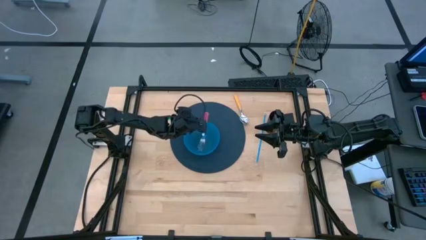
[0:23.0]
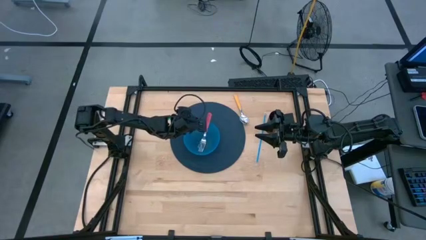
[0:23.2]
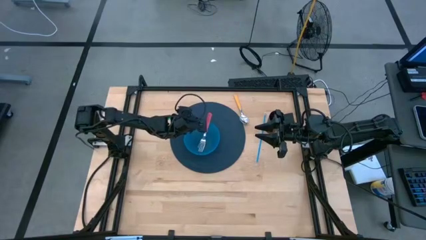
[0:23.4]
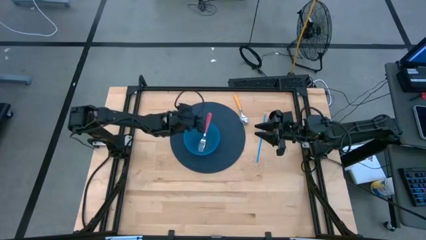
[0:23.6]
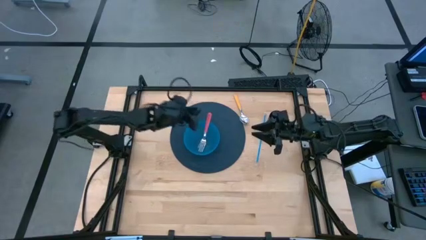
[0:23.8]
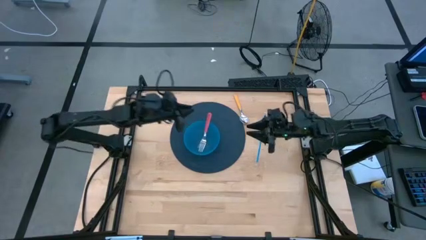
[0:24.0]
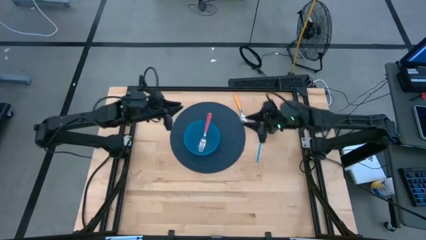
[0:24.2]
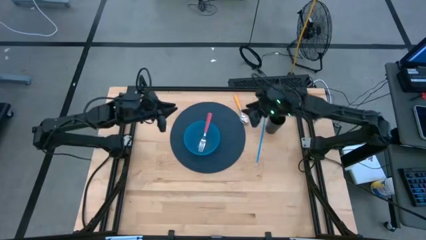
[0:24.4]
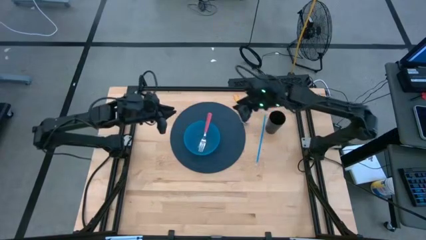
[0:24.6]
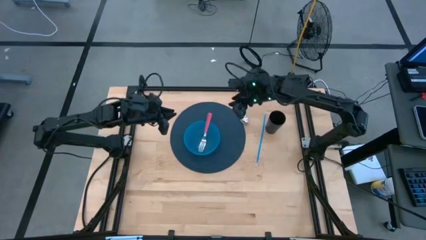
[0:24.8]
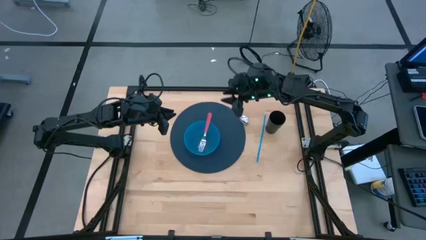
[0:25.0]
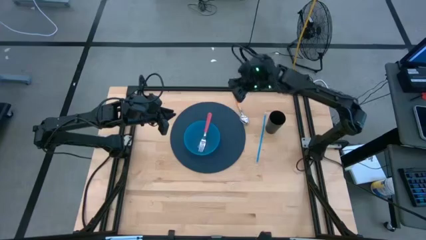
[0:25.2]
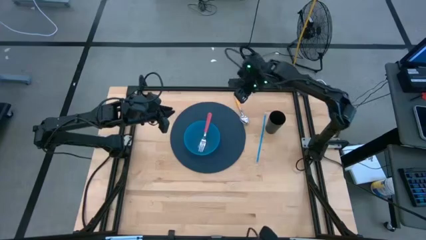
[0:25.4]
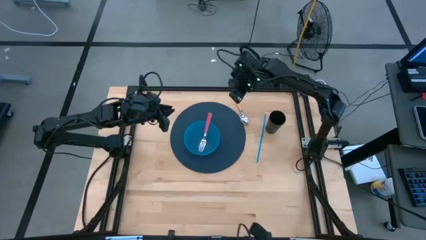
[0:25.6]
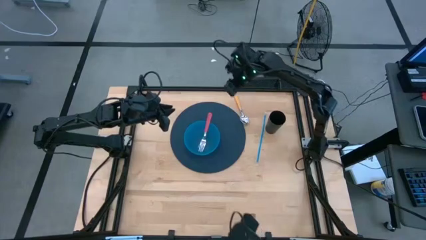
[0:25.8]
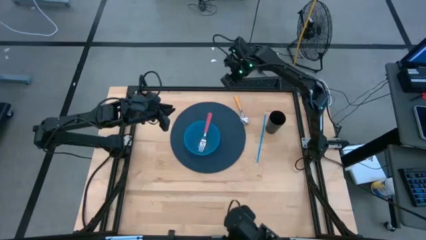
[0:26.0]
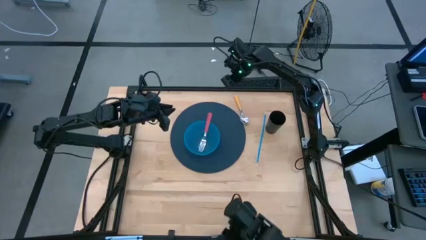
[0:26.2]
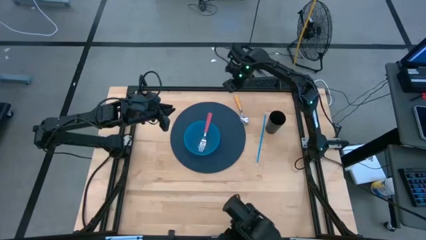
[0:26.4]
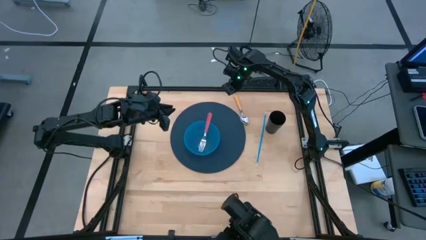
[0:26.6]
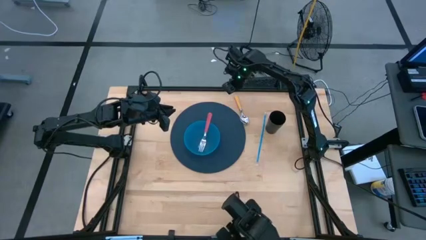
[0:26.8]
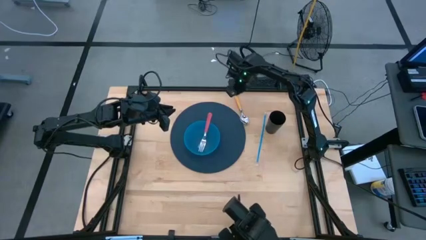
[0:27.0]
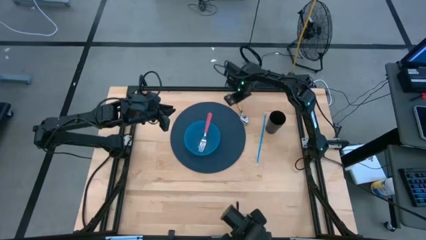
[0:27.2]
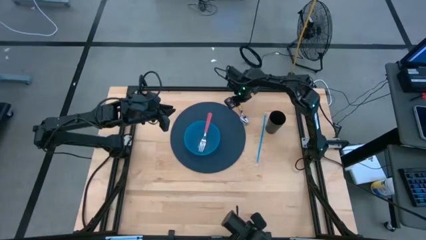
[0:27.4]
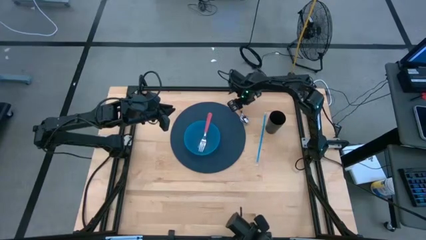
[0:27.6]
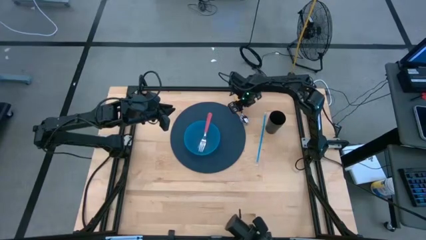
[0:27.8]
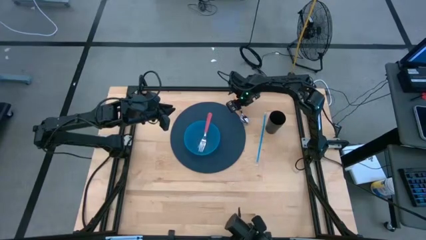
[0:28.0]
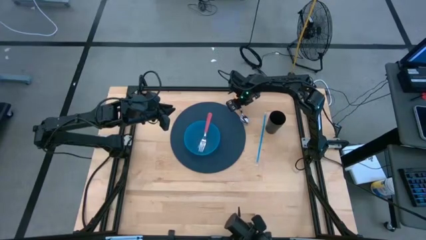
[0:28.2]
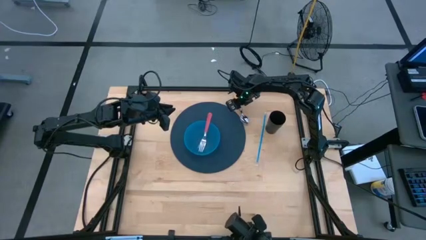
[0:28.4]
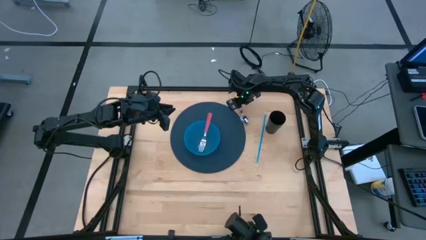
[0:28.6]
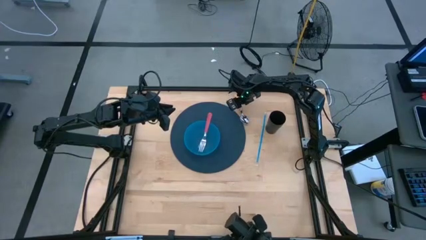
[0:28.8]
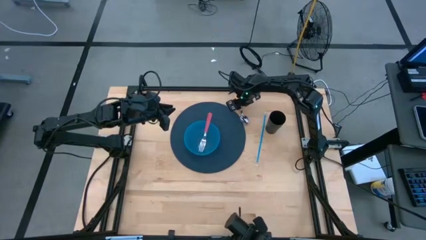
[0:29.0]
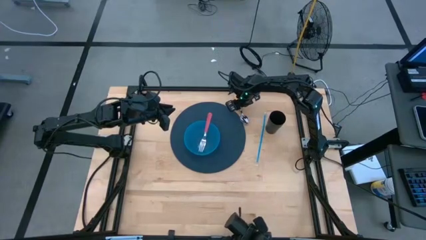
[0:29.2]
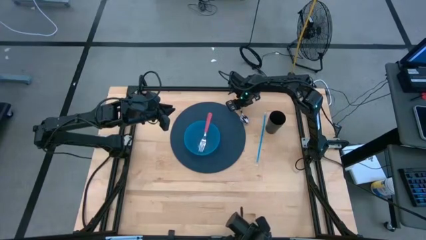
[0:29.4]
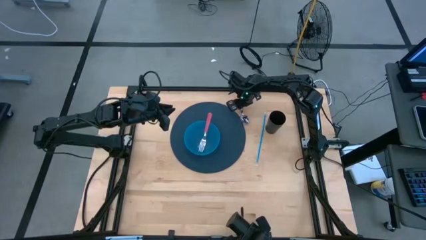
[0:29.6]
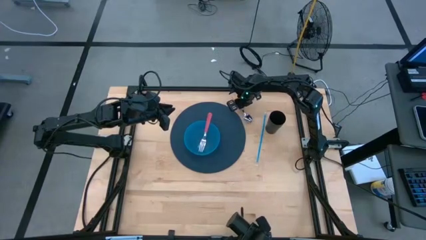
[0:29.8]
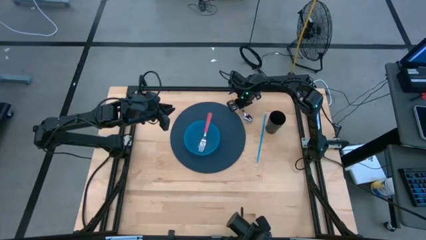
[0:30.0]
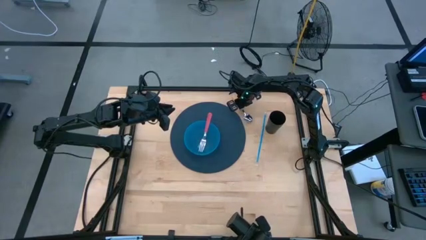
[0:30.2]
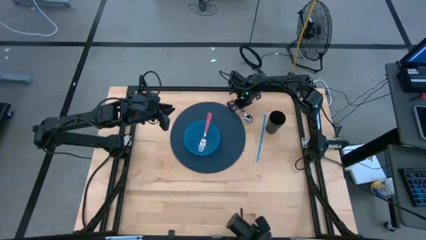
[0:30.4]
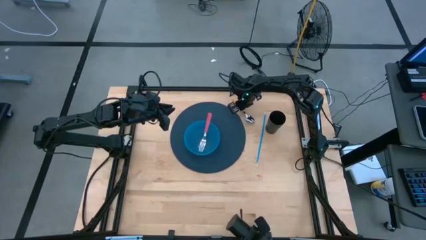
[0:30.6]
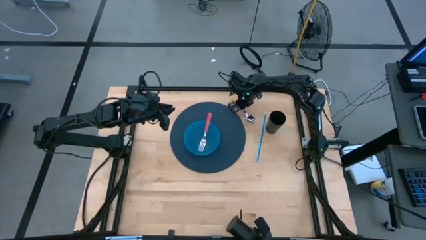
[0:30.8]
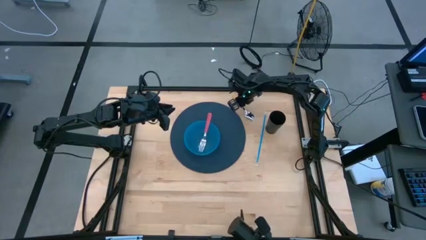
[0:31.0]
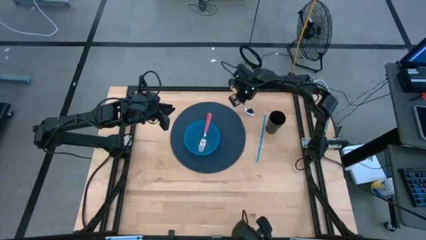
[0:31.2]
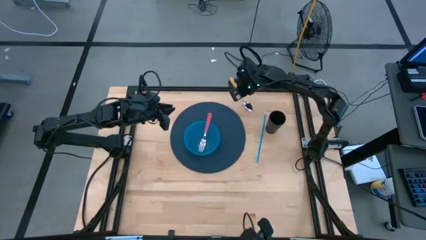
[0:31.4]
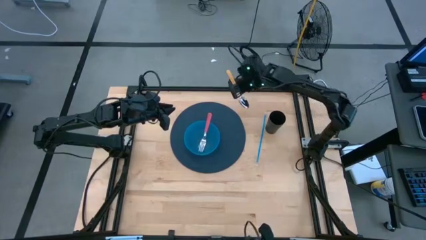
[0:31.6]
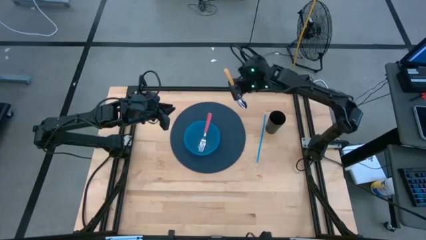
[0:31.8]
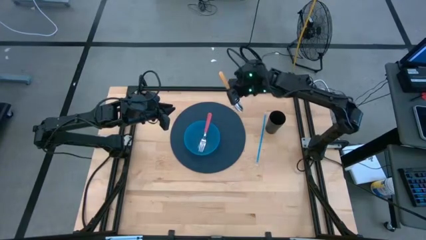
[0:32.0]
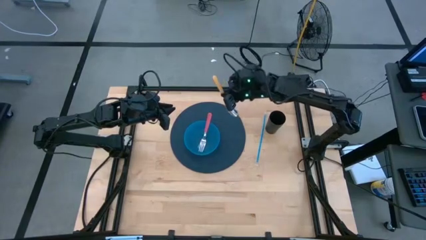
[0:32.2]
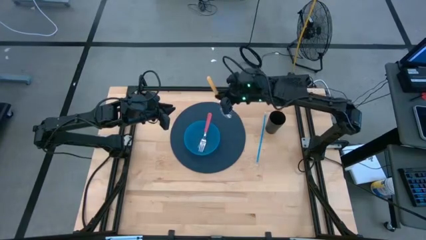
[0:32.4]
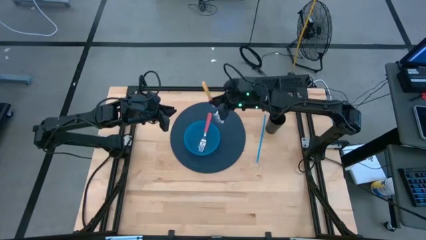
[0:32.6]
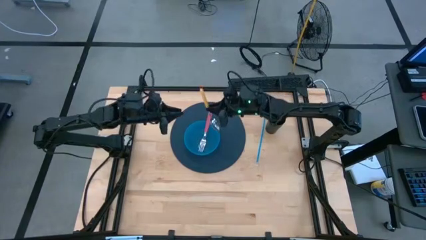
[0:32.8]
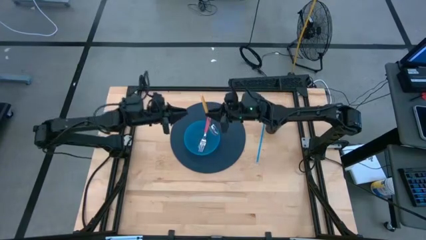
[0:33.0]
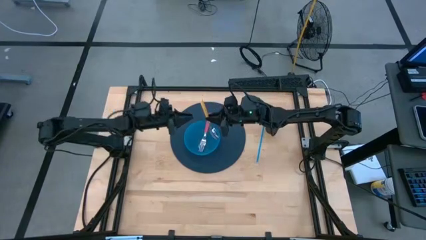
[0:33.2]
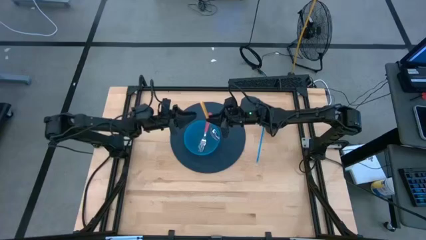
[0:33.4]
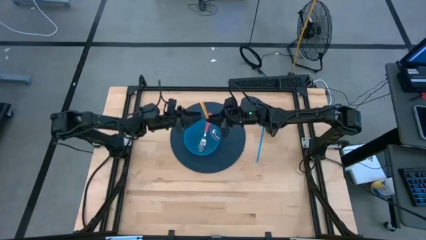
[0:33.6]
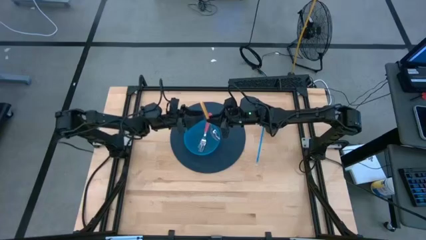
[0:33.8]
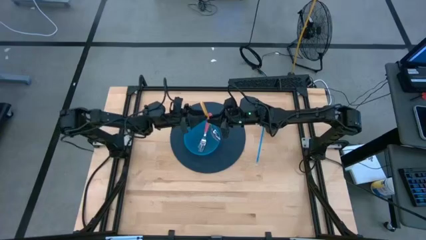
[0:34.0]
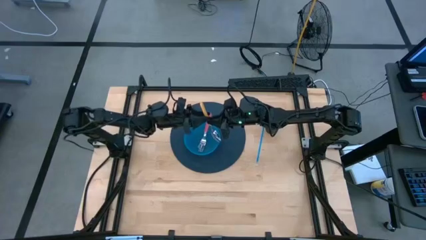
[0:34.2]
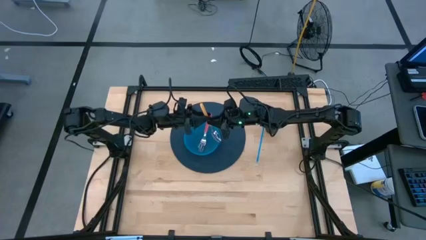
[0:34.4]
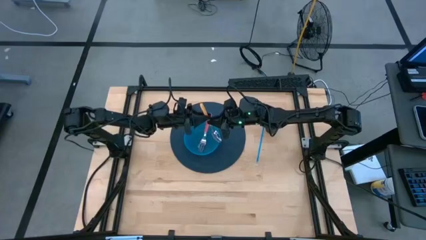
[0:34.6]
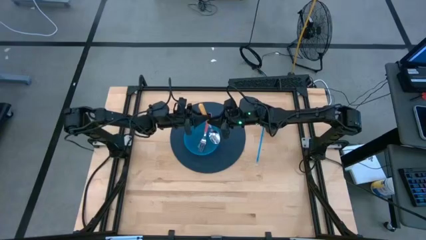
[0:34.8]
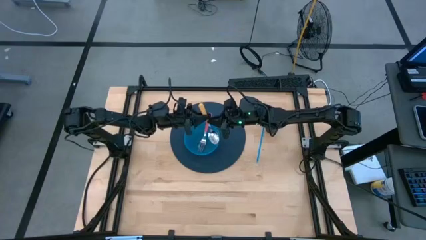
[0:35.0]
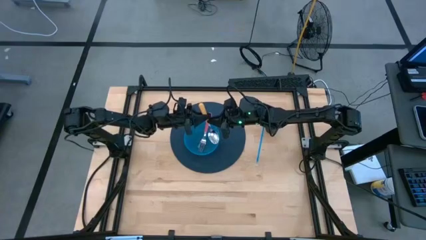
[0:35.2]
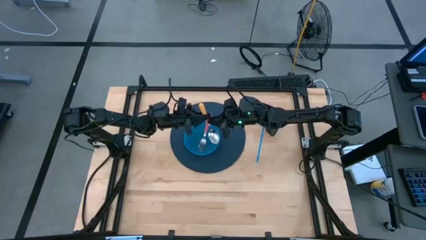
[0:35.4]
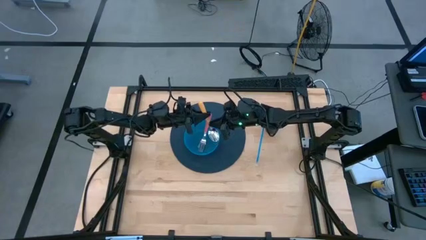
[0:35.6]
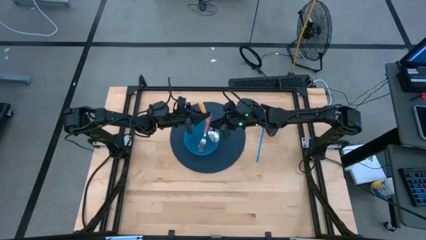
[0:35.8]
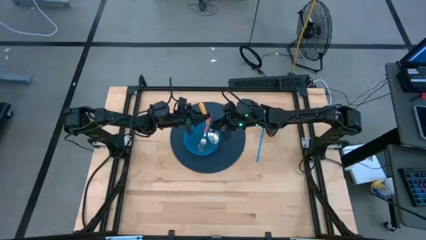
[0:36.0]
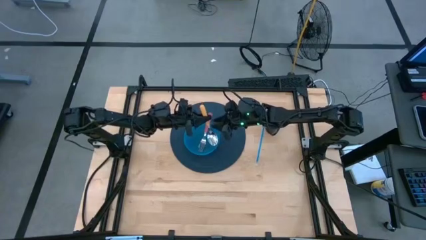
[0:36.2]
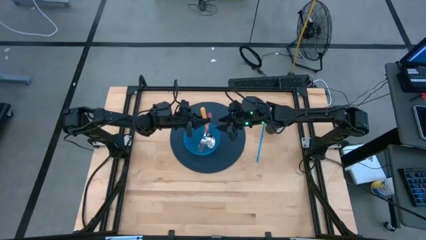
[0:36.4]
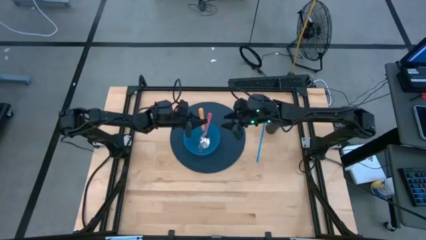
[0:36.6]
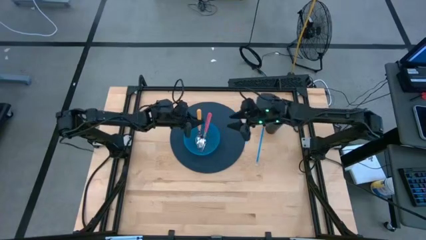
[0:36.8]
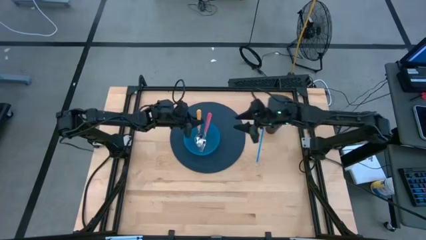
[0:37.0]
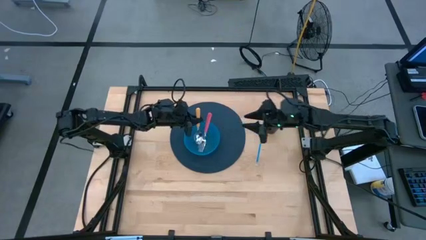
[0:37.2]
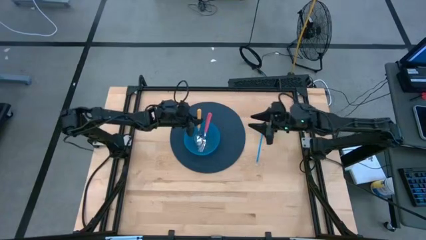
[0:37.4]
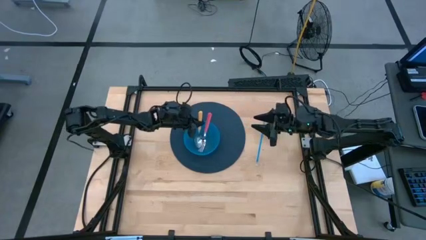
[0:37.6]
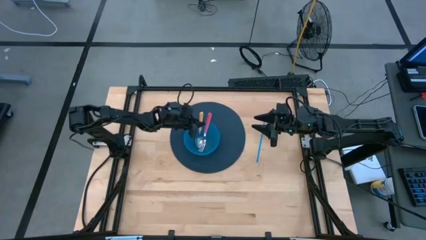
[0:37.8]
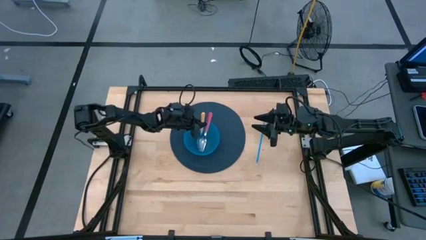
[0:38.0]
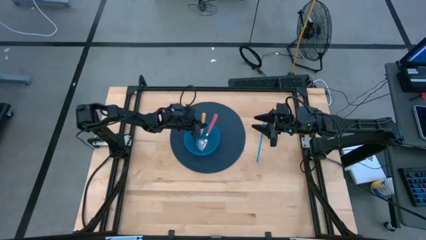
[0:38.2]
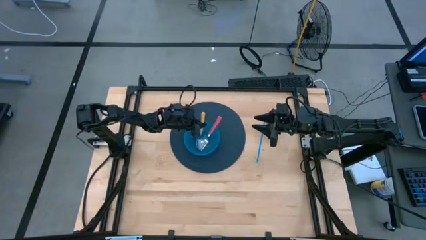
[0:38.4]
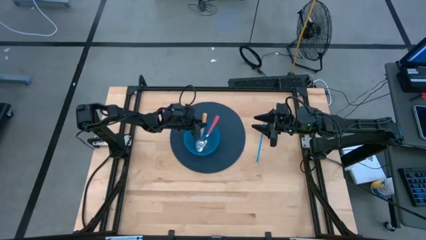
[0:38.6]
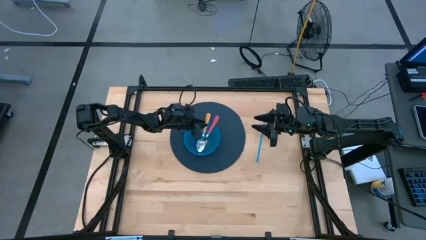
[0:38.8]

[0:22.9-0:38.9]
Task: Pick & Place Utensil
Put the yellow spoon into the blue bowl on the blue mat
